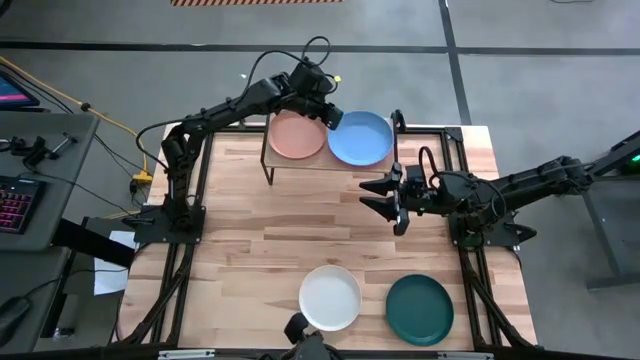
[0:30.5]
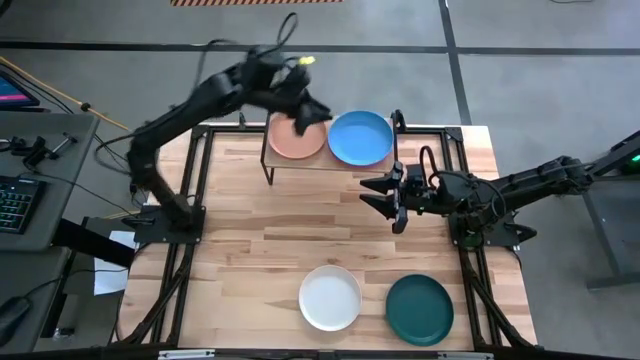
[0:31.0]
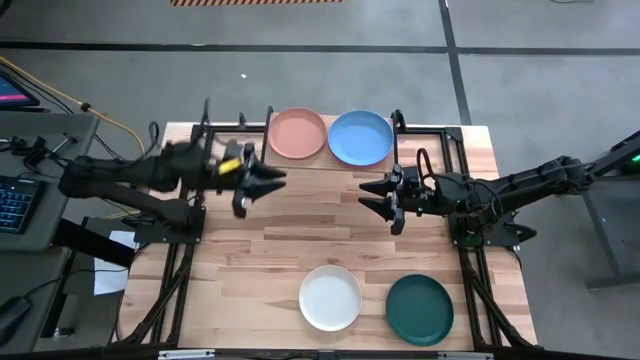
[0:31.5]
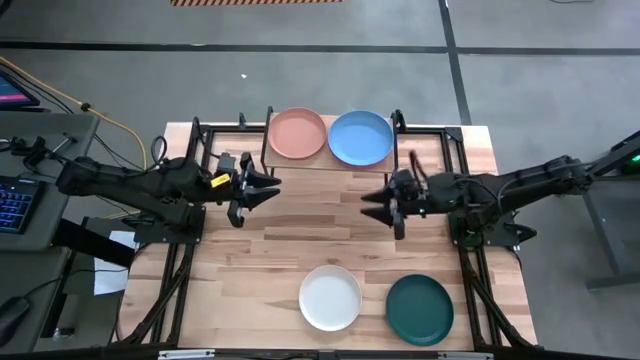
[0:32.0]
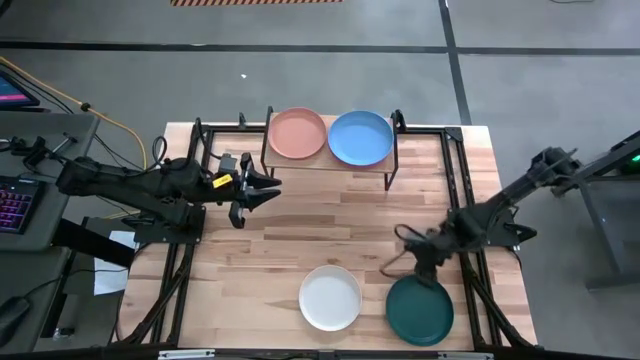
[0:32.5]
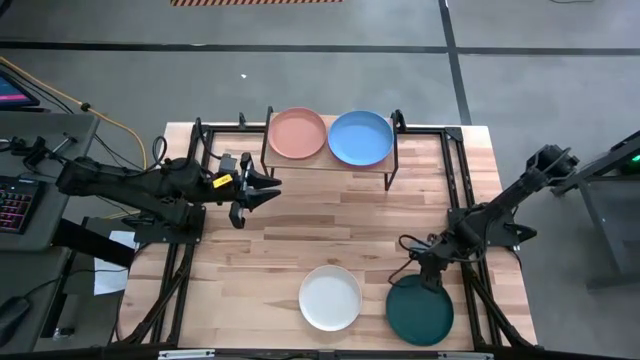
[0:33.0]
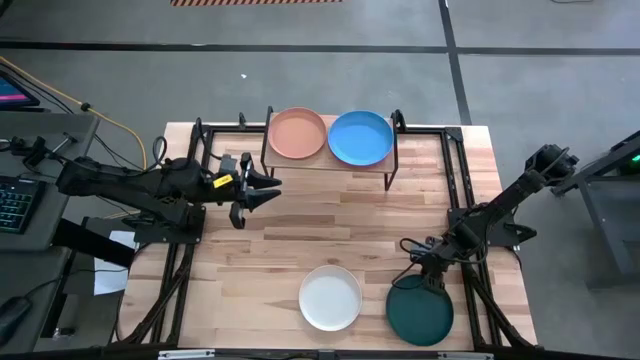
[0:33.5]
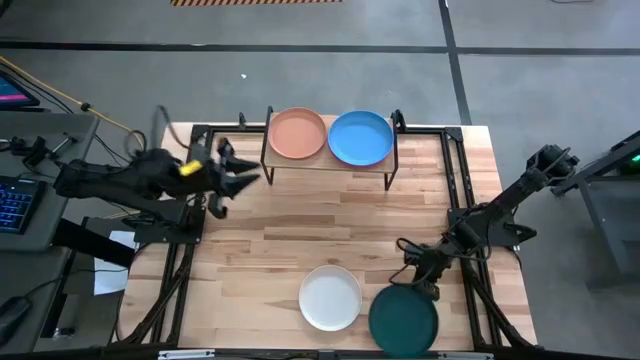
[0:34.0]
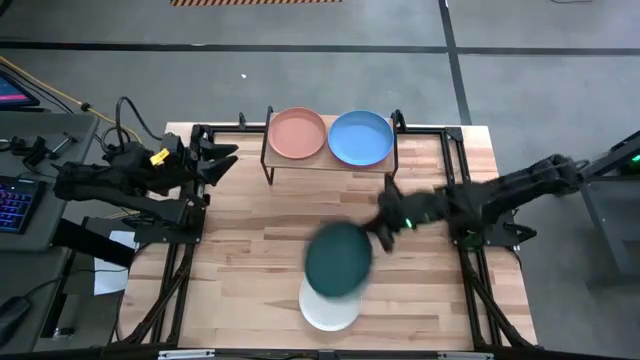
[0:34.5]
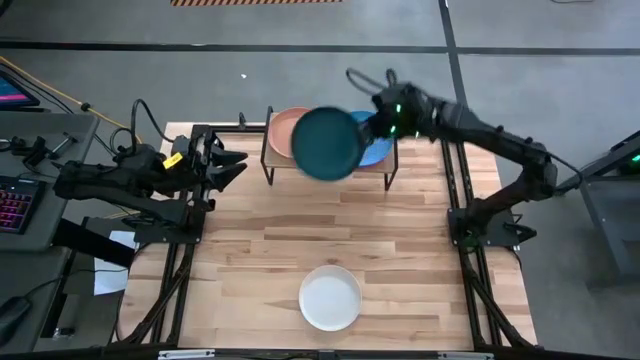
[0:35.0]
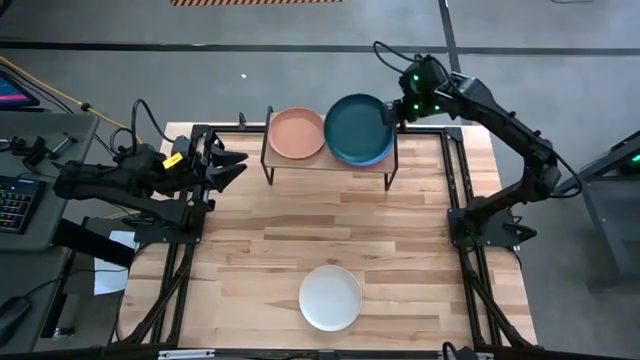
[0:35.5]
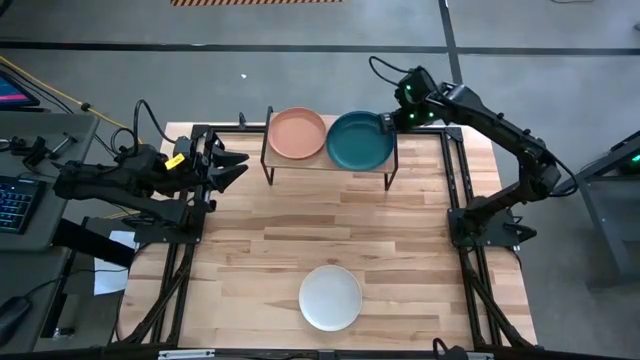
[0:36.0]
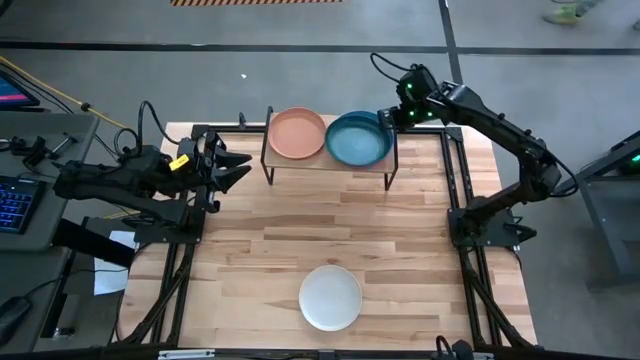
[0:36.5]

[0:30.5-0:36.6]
Task: Place and stack plates onto a shelf
Stack the green plate on the blue plate

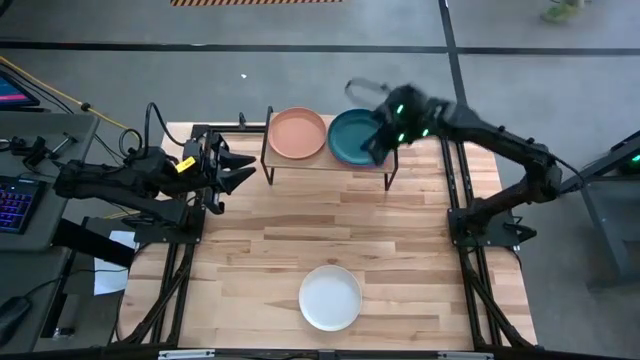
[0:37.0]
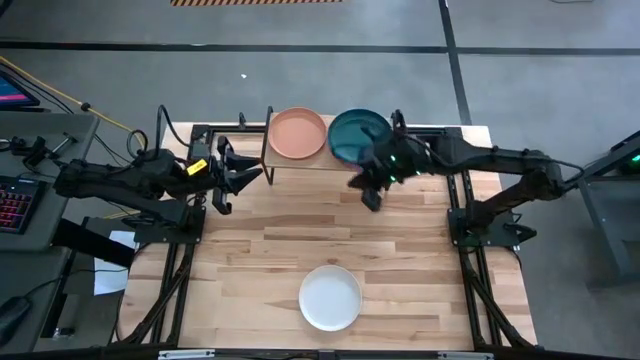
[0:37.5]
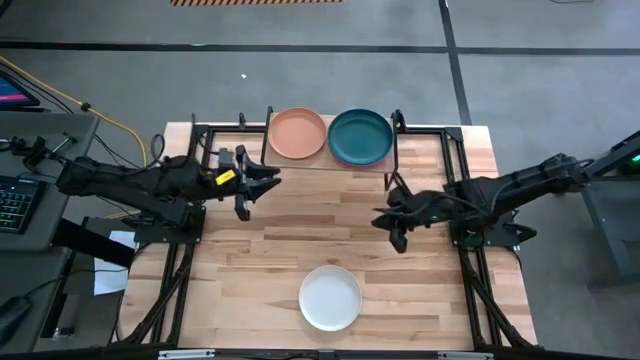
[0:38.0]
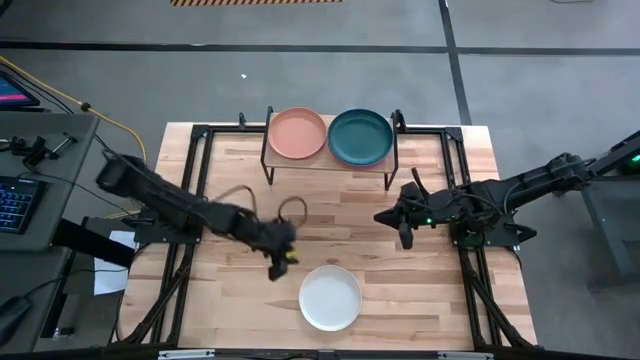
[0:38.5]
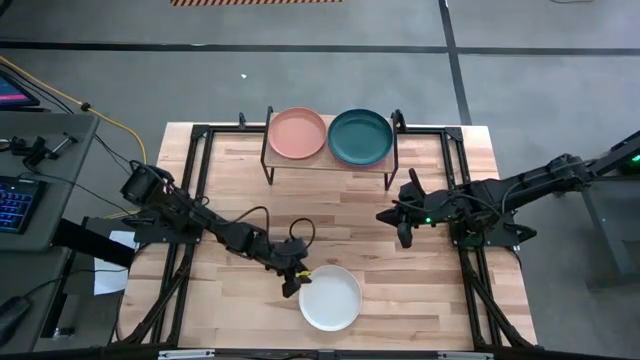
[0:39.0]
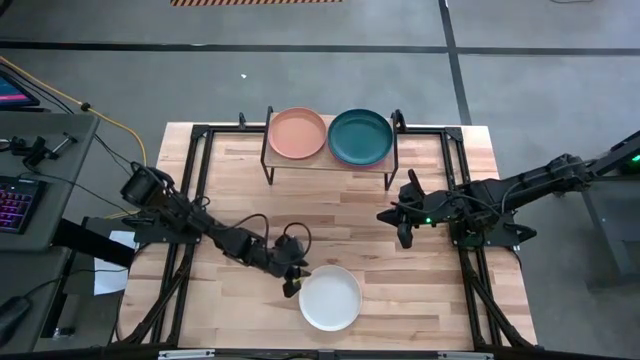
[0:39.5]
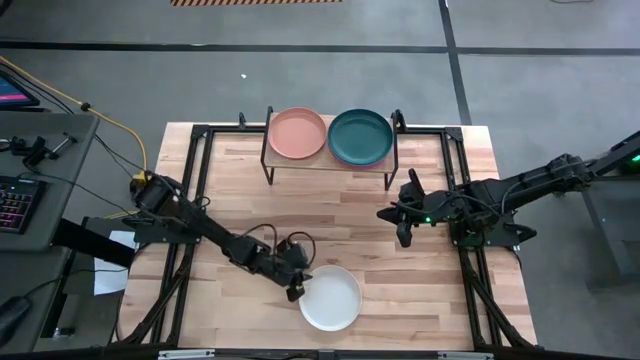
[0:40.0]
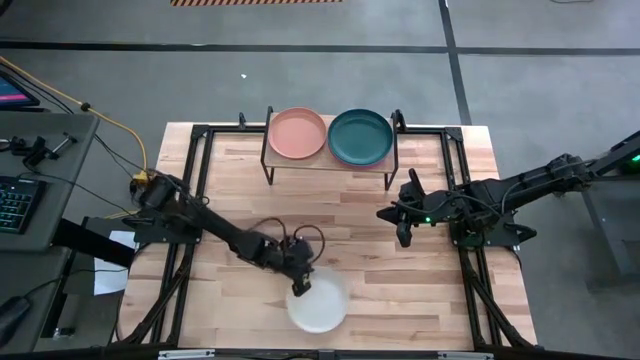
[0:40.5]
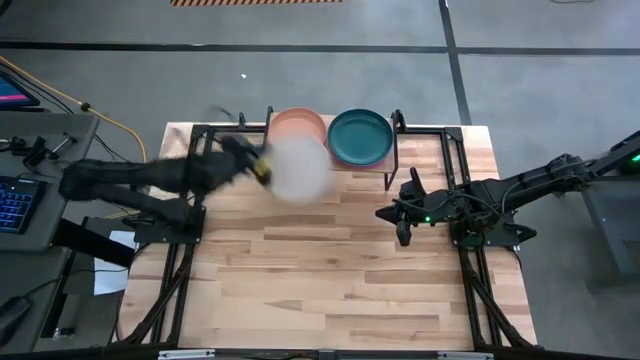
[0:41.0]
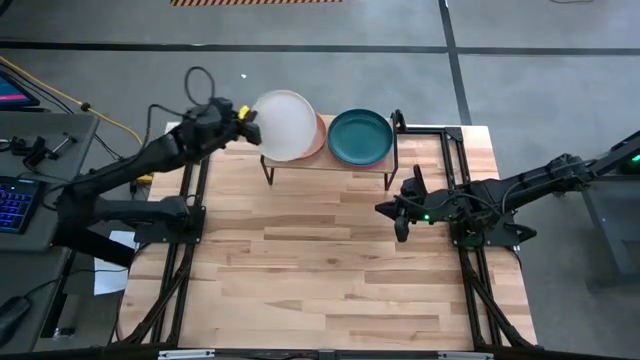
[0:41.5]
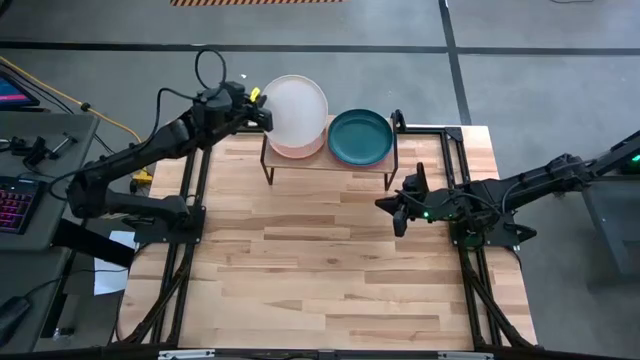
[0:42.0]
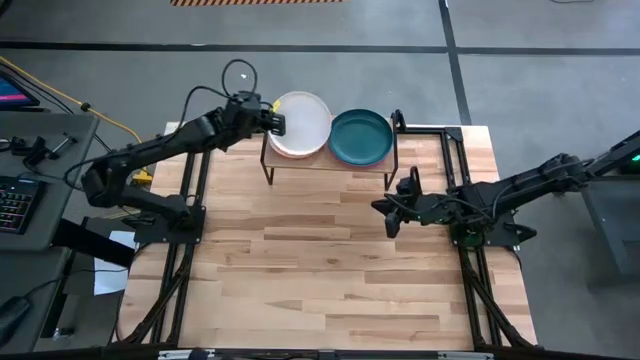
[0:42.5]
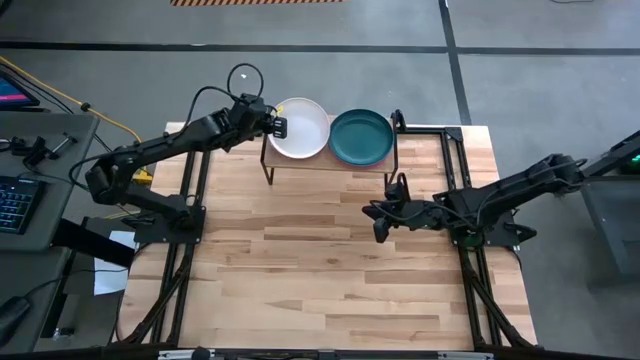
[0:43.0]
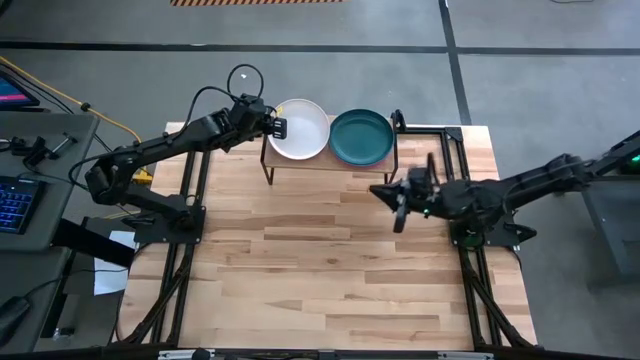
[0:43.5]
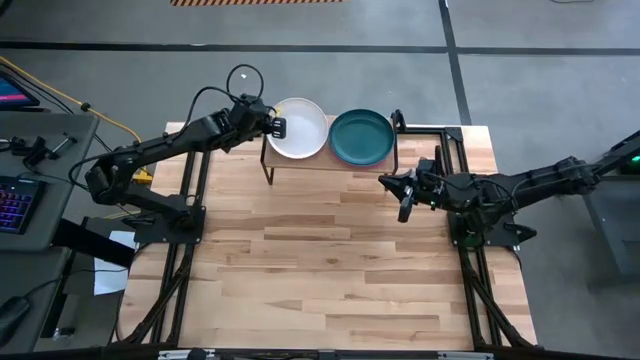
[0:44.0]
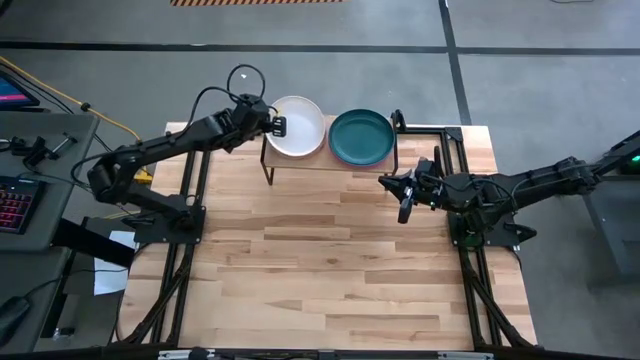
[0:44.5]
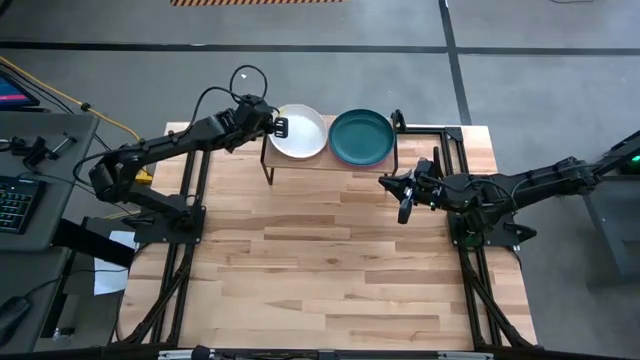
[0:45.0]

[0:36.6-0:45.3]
Stack the white plate on the brown plate

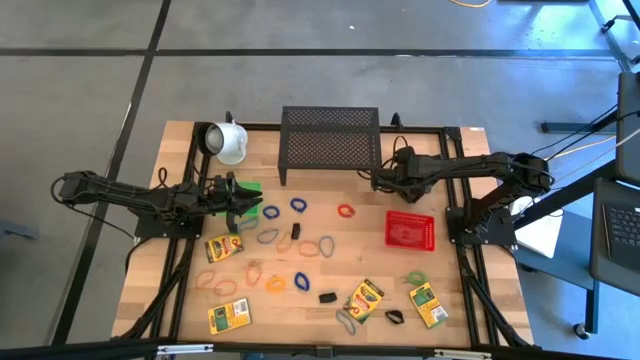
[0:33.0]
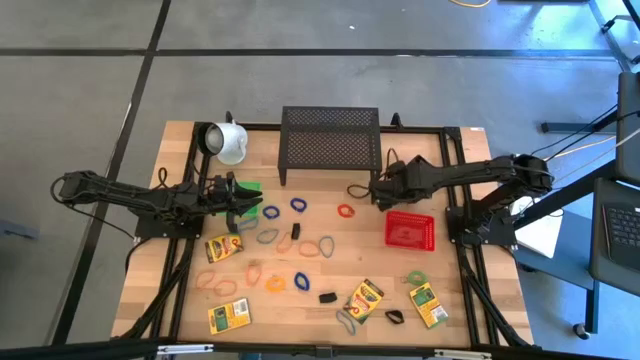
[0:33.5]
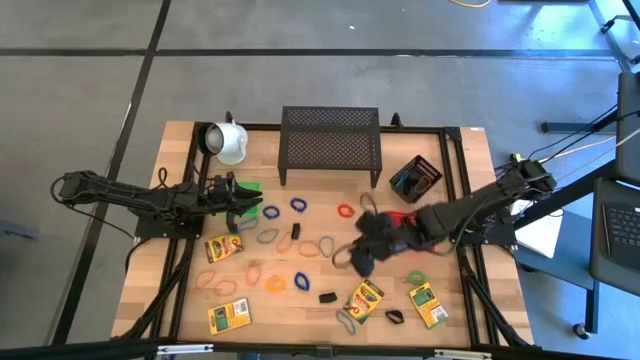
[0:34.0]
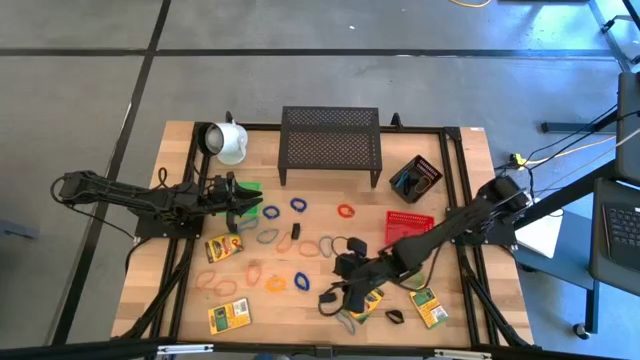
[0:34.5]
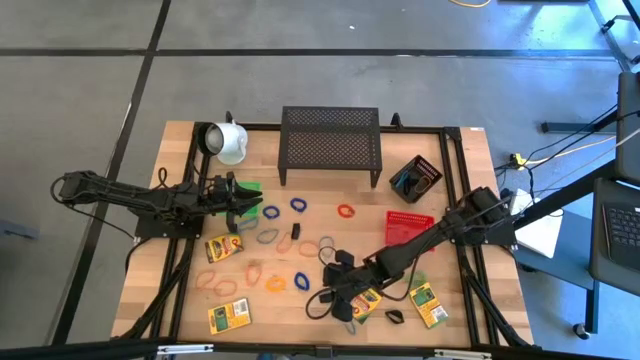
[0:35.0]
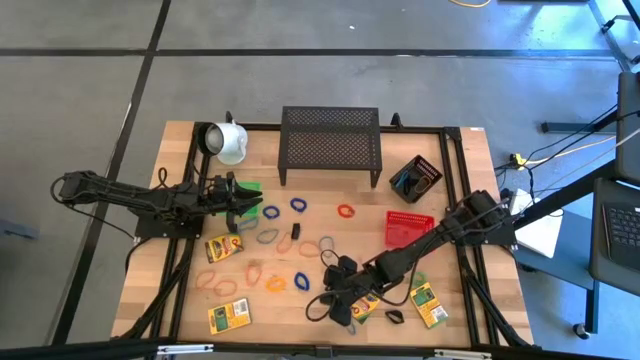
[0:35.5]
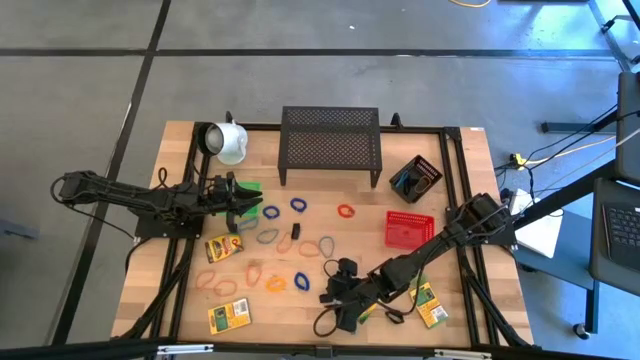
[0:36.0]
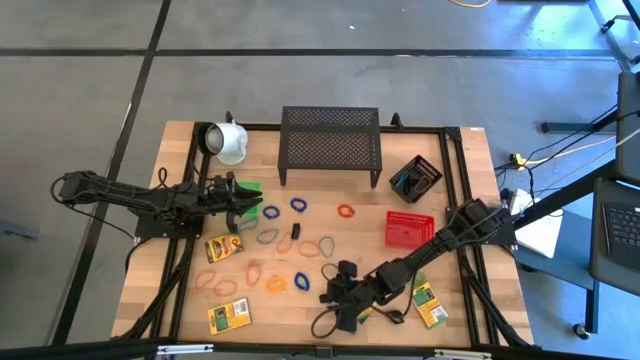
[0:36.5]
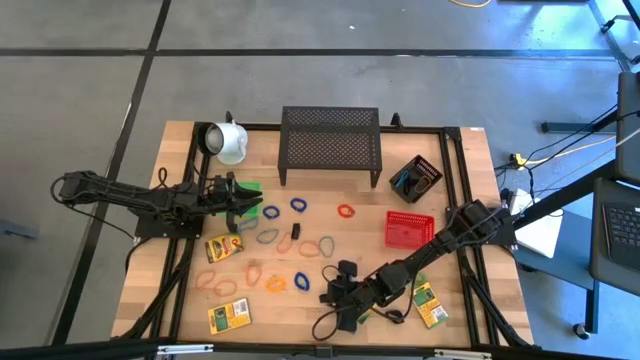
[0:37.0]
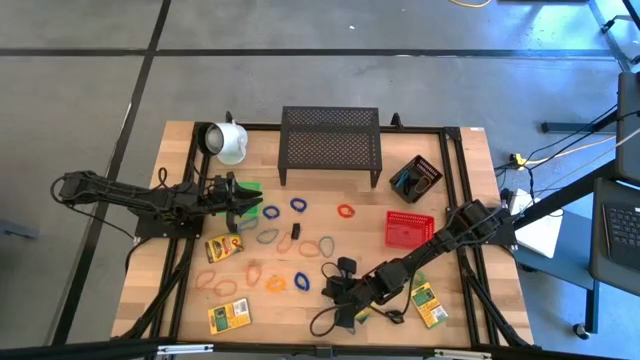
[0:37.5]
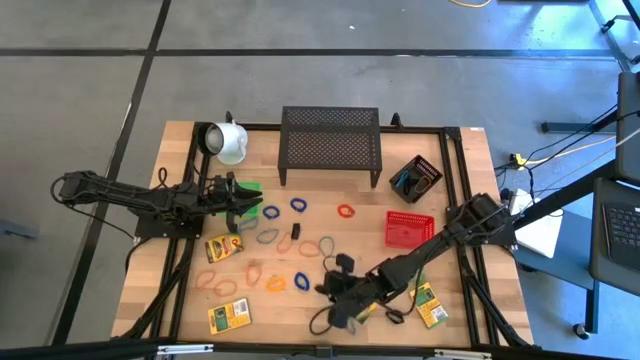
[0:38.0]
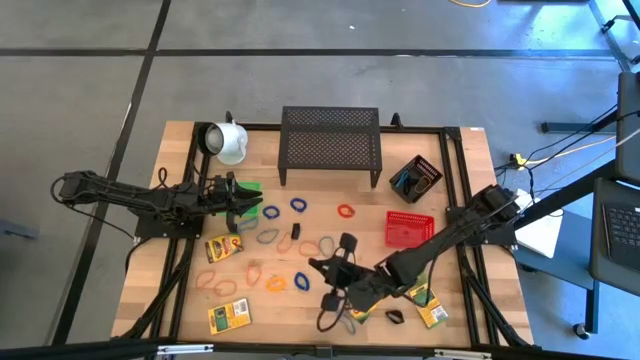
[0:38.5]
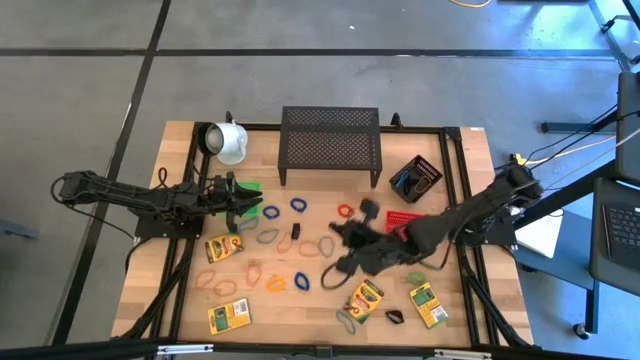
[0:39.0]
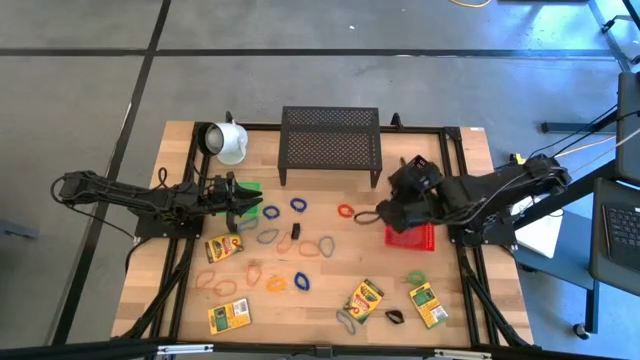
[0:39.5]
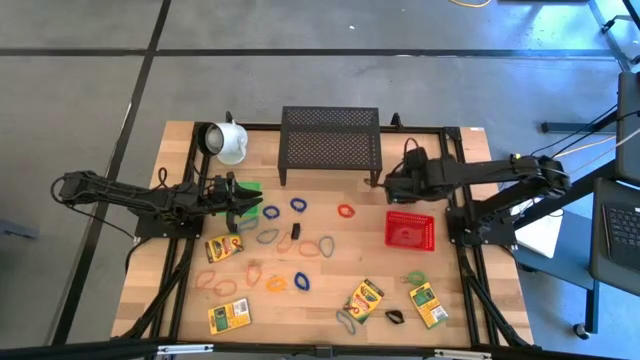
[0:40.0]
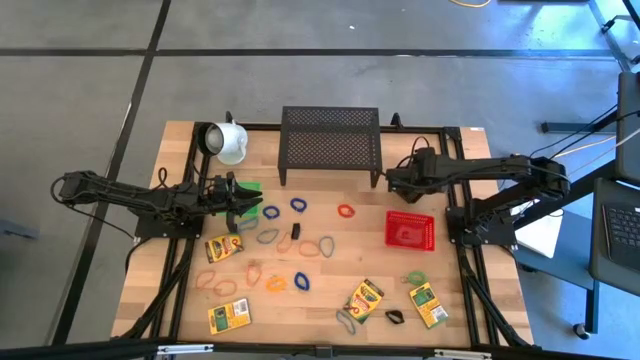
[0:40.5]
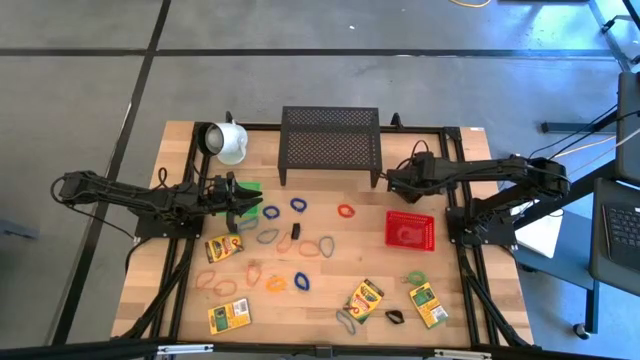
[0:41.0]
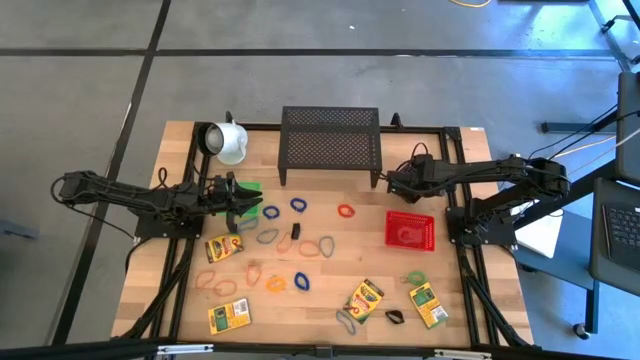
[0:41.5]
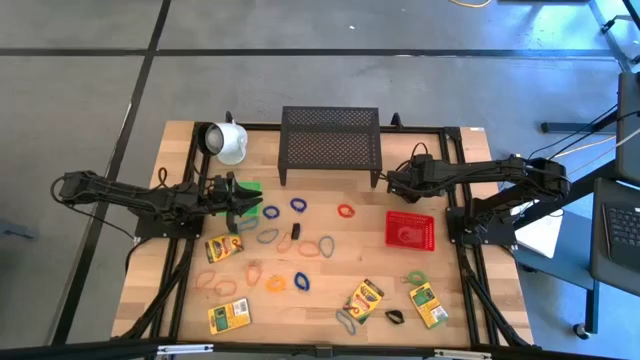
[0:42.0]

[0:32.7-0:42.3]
Task: Pick & Place Office Desk Supplies
Put the black rubber band into the black bin
